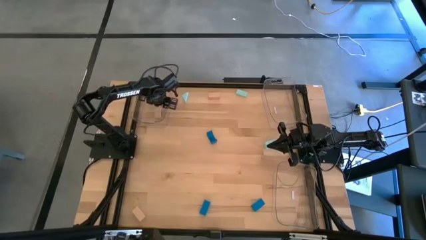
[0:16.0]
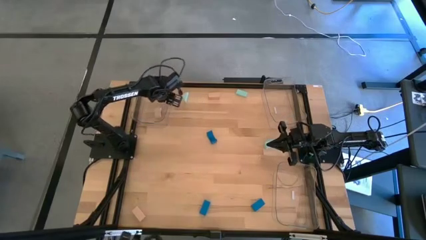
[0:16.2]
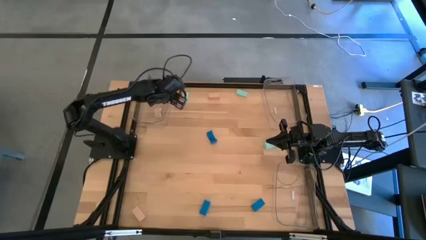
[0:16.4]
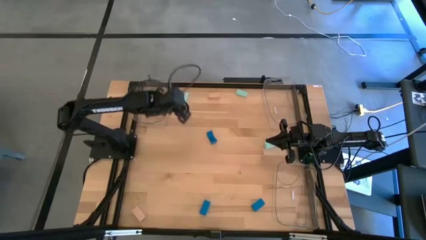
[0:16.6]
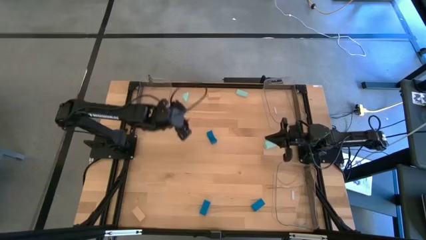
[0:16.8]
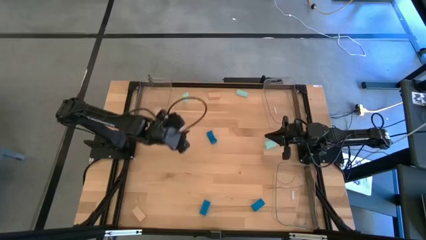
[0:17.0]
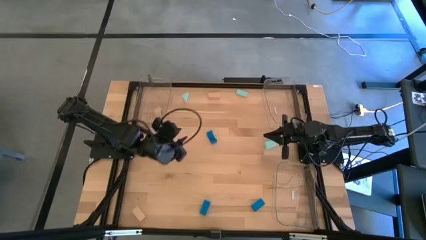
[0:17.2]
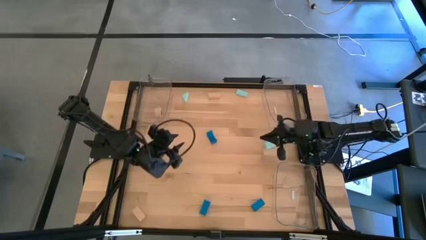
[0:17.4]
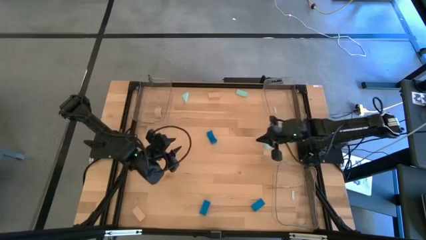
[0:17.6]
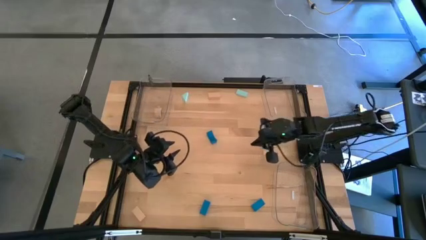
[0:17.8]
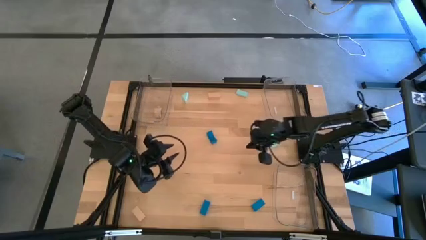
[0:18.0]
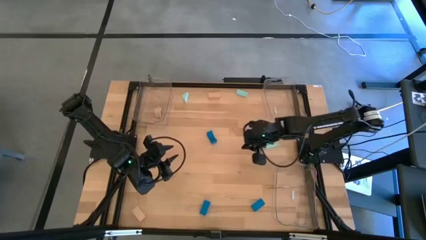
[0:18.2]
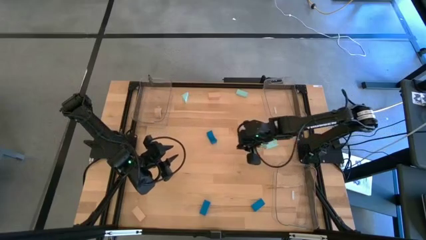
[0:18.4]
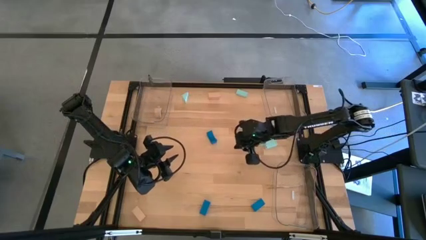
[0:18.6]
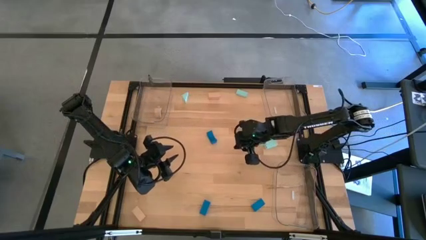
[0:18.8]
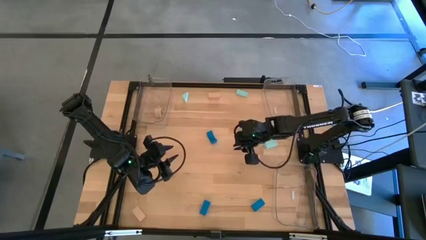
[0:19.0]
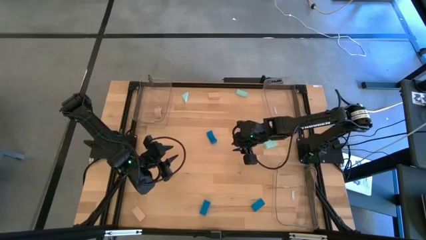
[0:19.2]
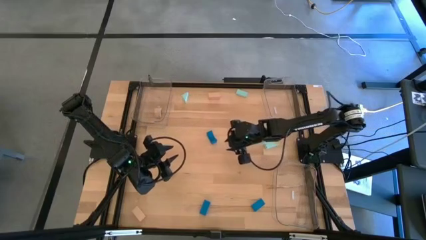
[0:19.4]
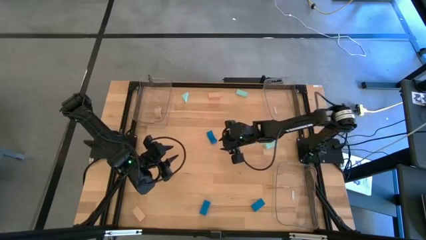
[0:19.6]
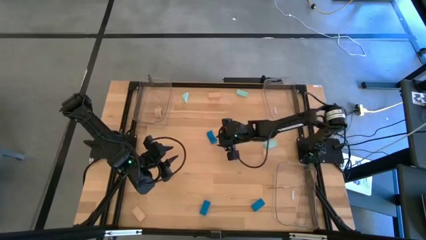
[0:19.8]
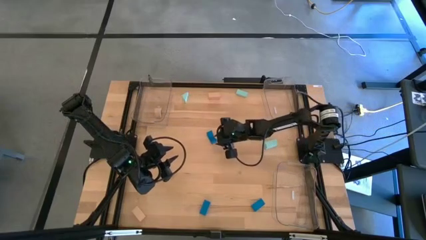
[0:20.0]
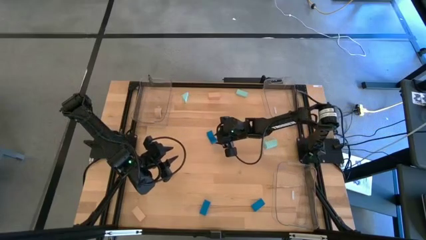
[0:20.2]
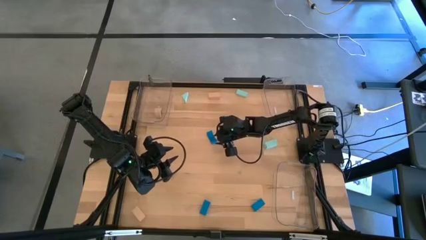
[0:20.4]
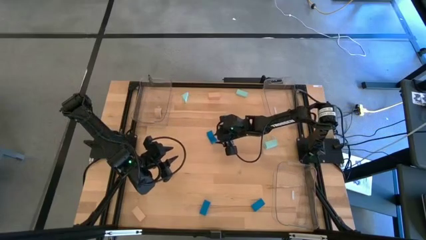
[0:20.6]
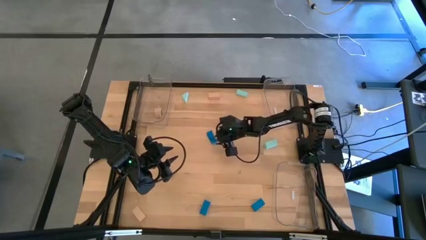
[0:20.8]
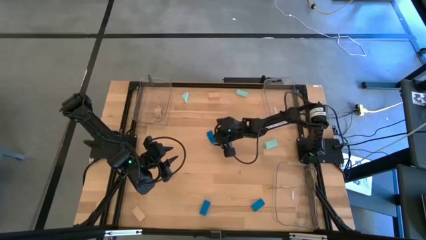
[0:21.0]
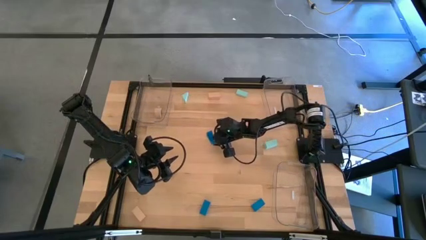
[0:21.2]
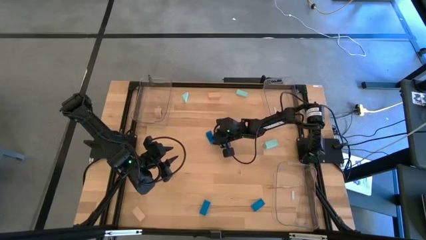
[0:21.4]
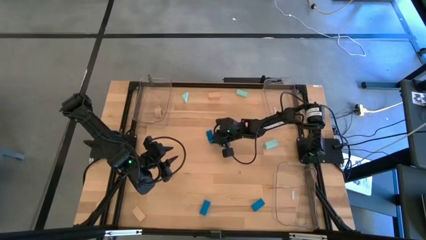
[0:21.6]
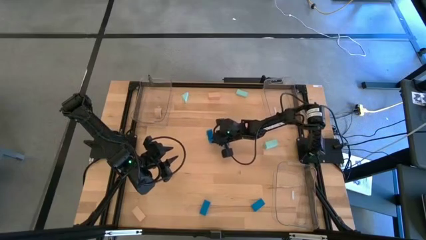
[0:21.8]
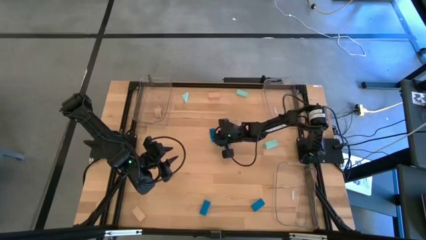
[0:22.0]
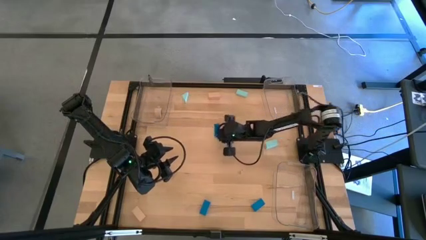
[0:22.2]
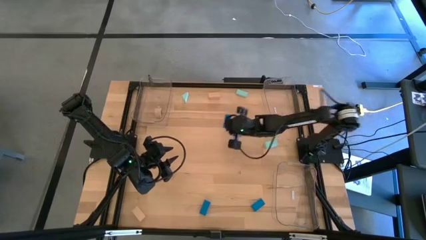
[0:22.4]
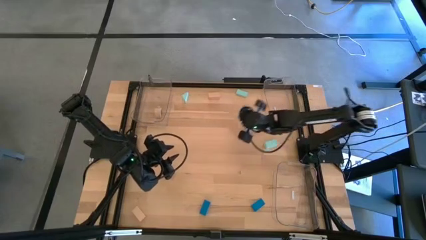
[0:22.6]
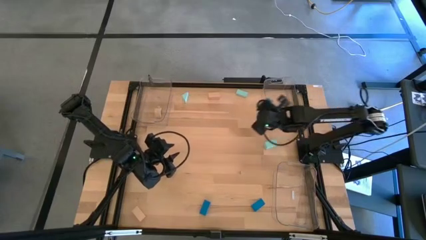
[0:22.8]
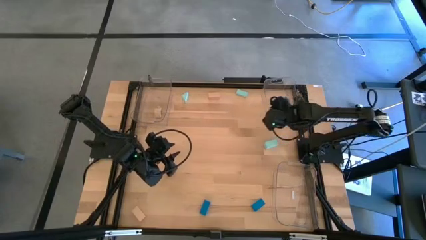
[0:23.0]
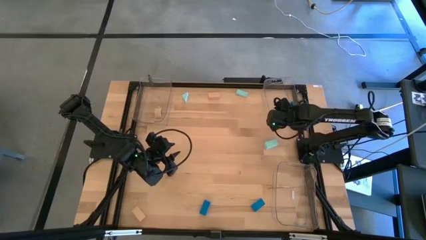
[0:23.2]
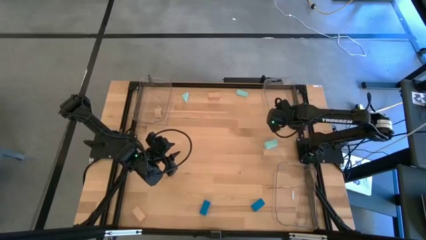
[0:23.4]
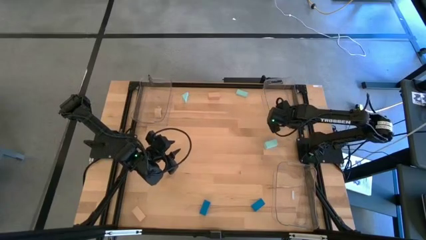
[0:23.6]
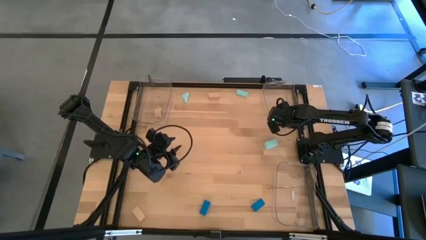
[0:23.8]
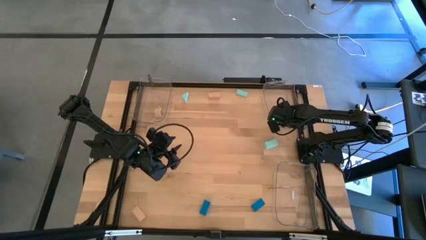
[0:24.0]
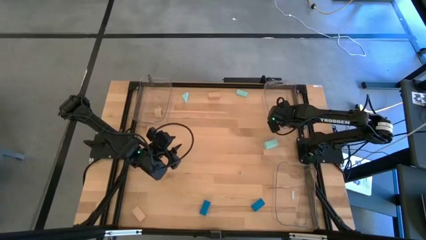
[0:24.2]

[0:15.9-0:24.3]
Task: Sort & place blocks by color
Put the top center blue block into the top right transparent bin

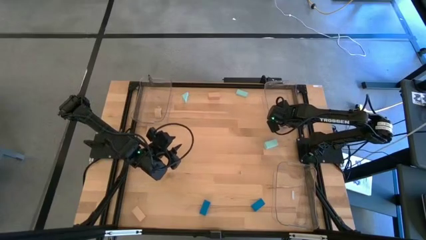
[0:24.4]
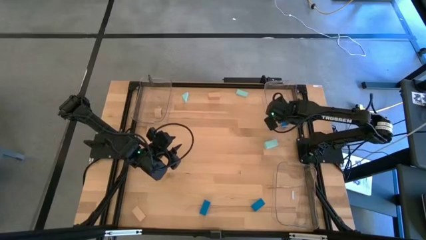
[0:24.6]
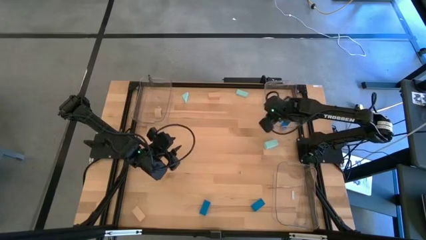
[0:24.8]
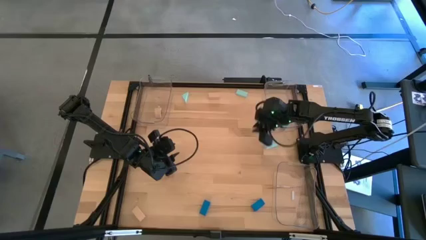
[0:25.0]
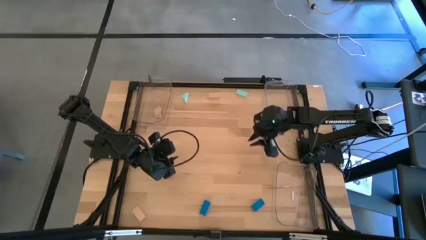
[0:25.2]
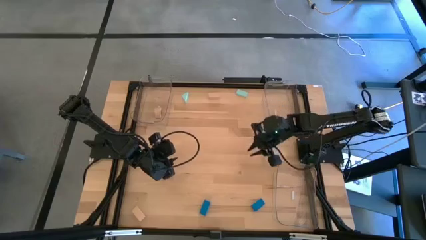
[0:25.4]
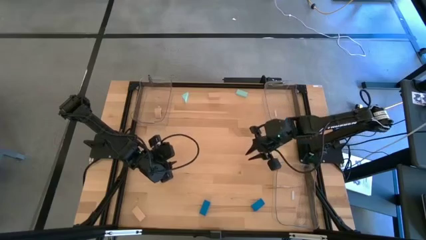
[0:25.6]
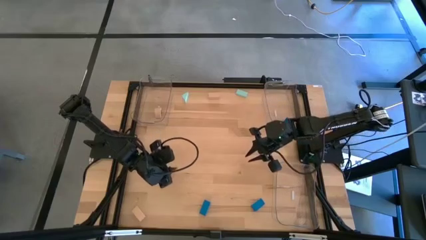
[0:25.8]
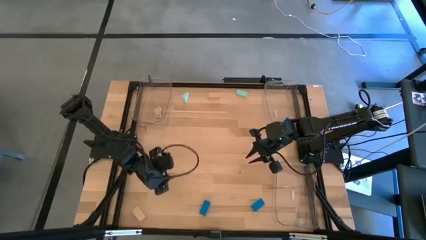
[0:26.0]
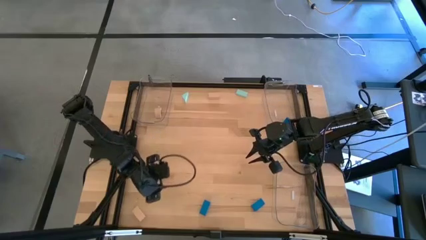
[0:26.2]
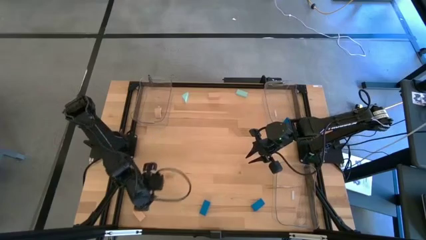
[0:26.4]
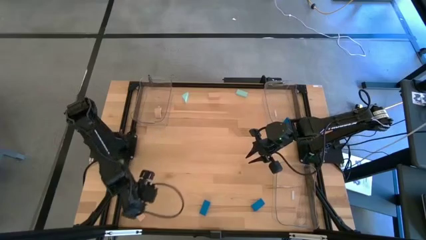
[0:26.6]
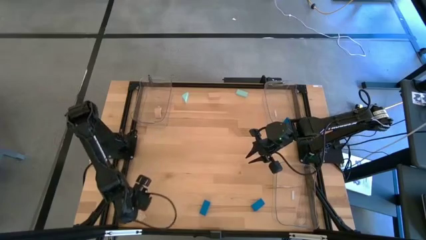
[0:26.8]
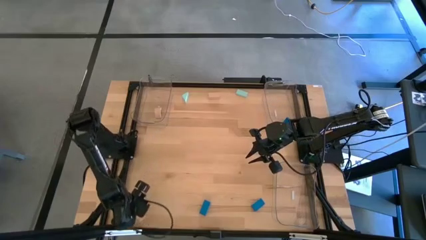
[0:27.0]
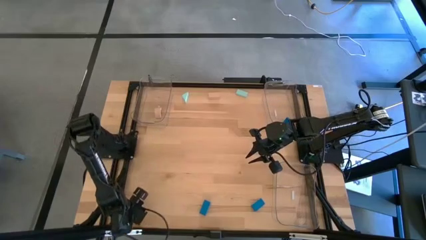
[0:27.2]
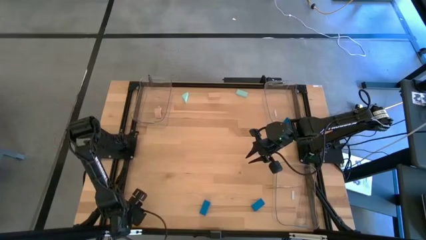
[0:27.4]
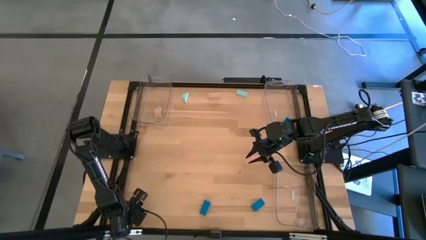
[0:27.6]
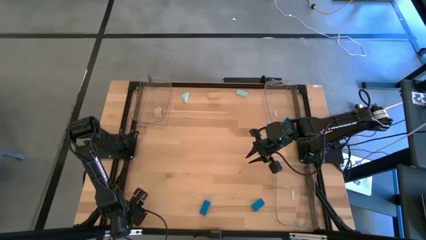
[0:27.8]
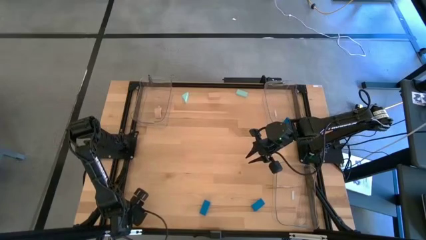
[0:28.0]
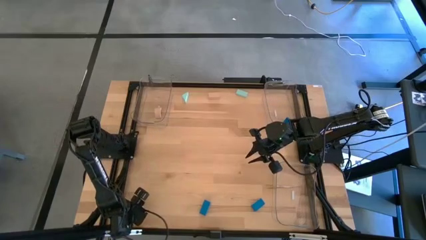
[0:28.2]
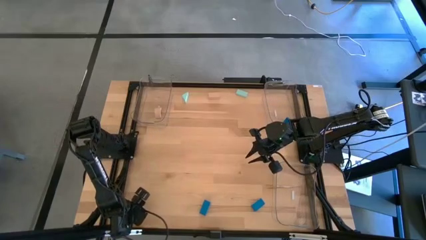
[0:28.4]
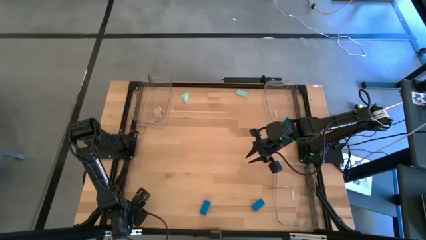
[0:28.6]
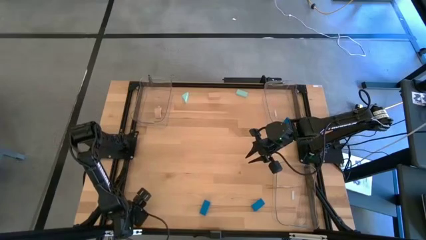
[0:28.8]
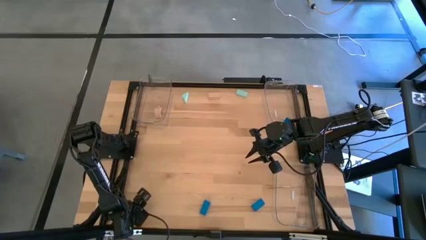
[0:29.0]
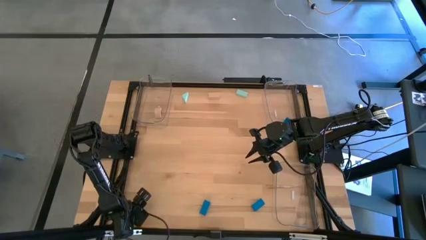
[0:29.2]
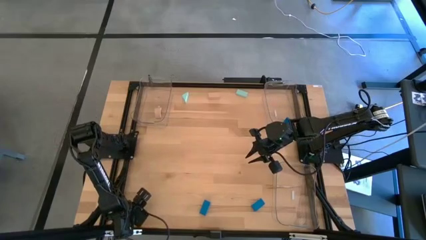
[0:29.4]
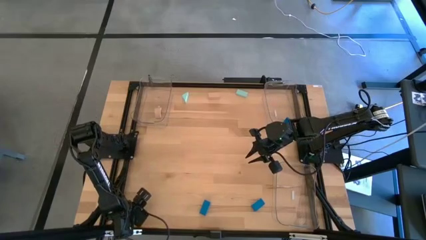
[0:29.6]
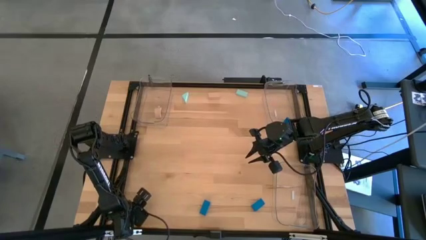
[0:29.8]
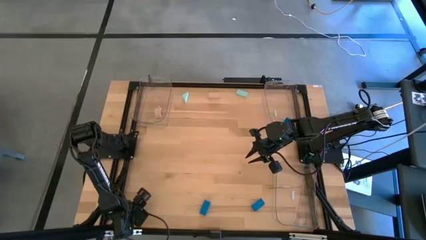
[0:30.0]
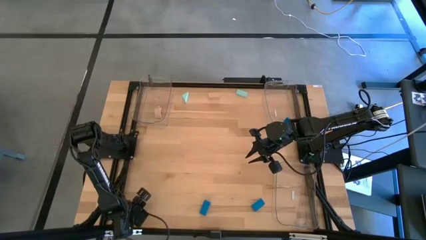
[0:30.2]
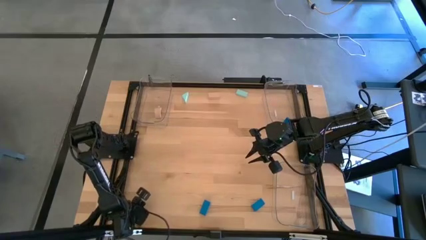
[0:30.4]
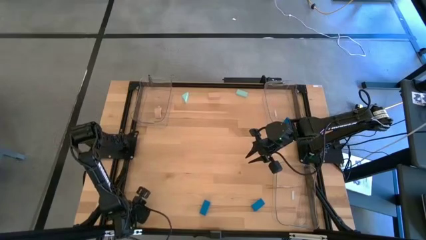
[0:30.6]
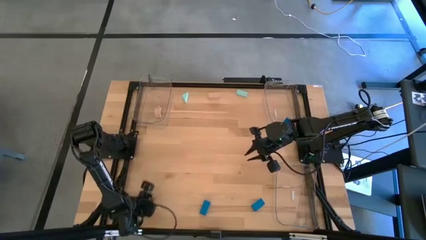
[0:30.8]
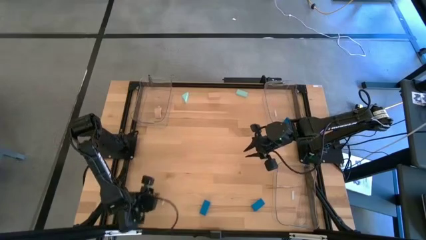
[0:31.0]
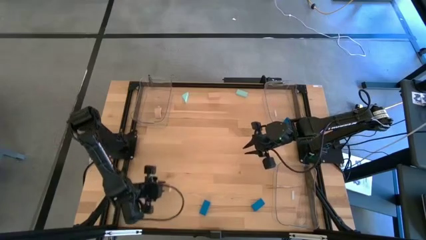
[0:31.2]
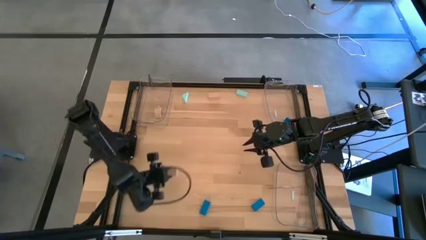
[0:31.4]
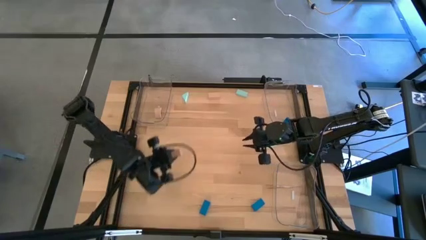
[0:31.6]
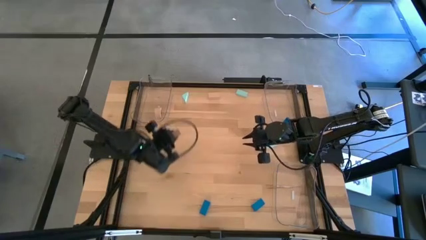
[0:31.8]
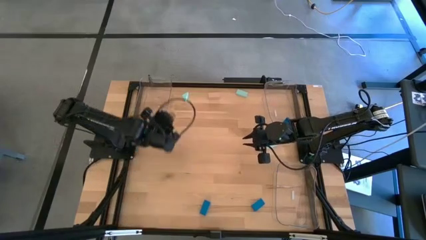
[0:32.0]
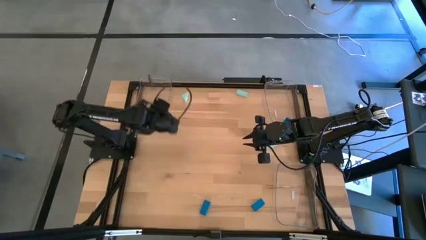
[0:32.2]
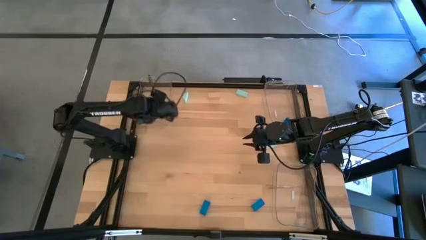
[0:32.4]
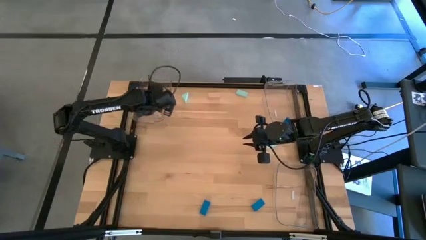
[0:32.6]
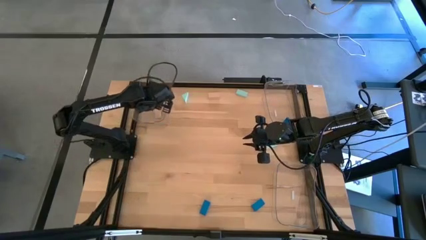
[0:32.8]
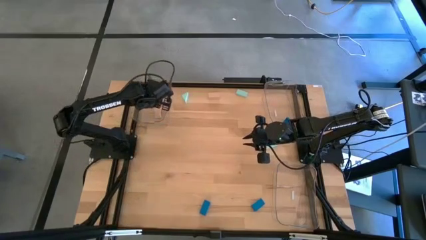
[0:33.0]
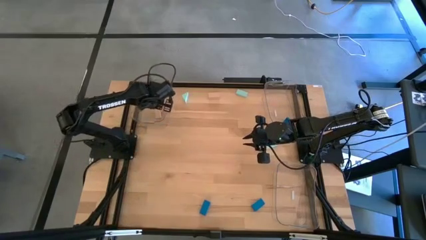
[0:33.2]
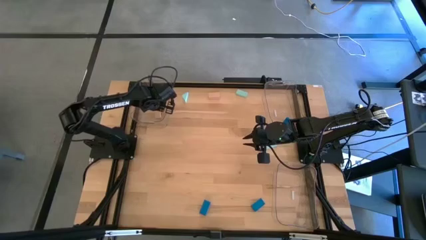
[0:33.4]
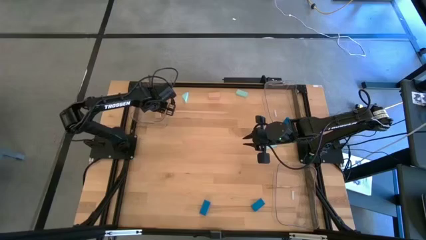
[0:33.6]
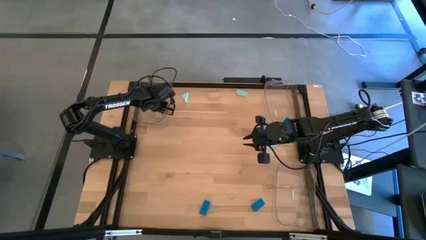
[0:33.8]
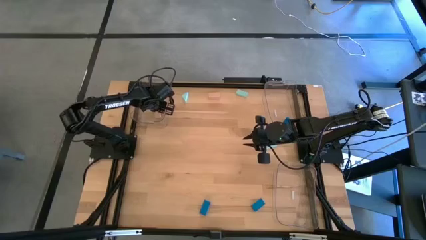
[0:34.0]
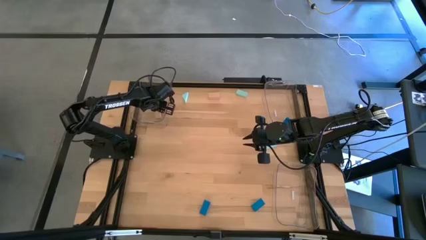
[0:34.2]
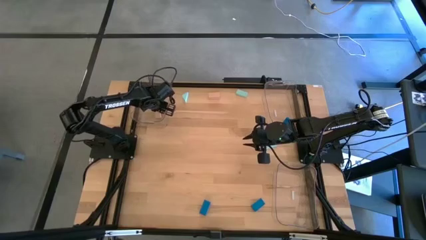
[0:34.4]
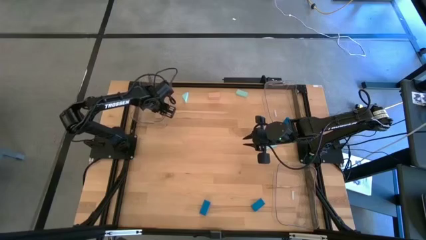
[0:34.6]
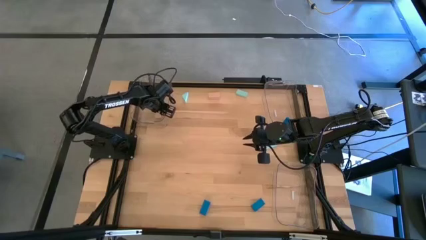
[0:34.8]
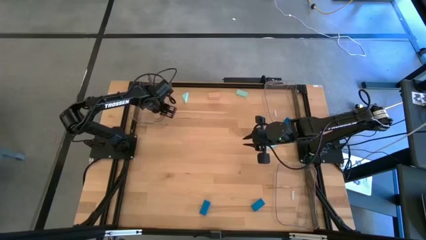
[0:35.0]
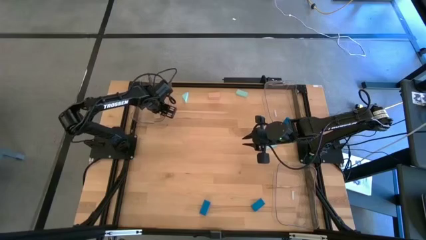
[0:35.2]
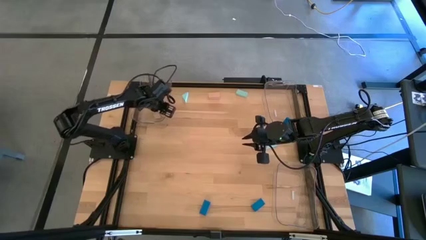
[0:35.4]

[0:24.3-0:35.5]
Put the bottom brown block into the top left transparent bin
